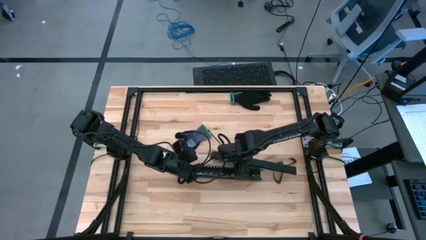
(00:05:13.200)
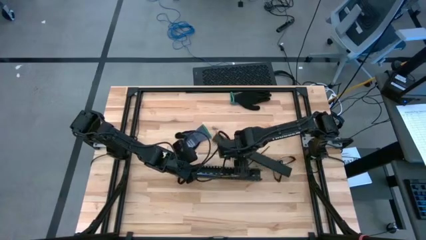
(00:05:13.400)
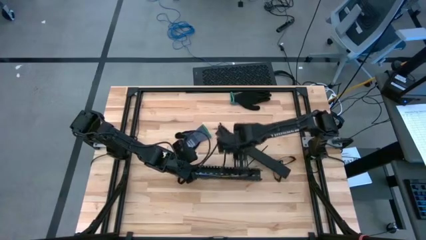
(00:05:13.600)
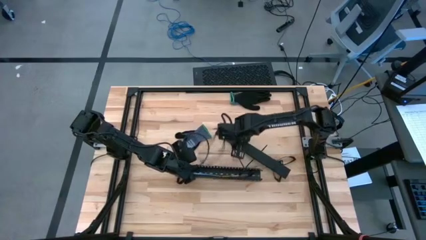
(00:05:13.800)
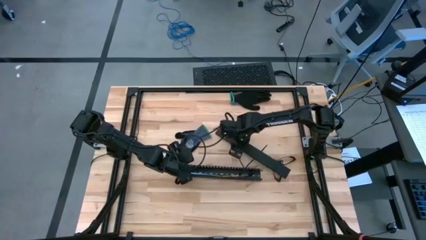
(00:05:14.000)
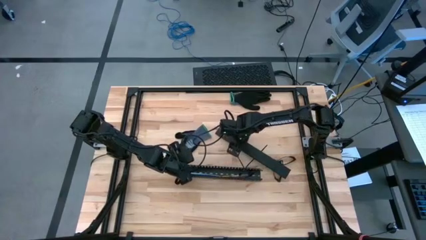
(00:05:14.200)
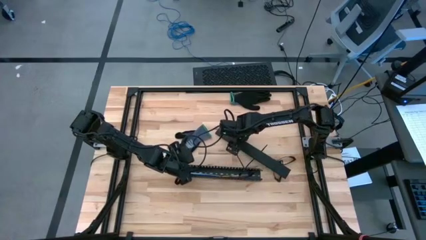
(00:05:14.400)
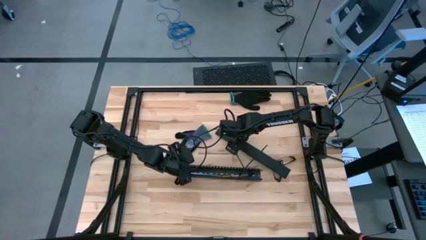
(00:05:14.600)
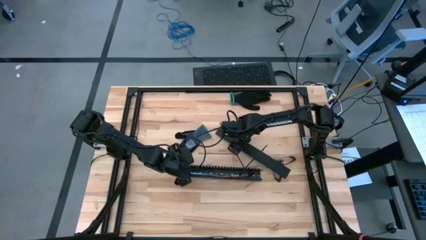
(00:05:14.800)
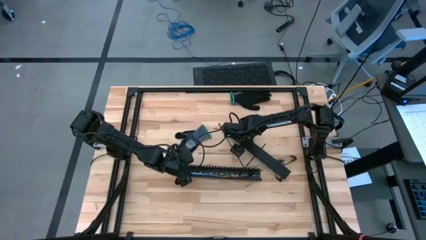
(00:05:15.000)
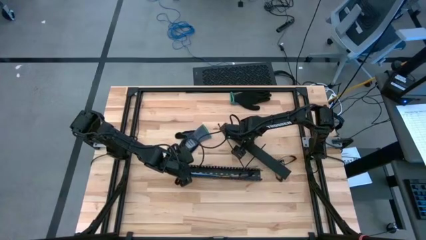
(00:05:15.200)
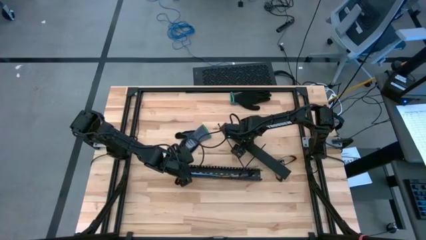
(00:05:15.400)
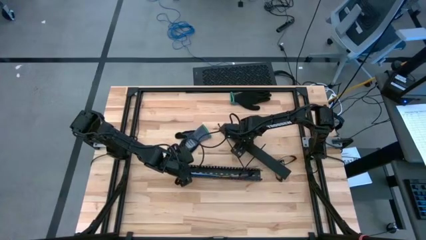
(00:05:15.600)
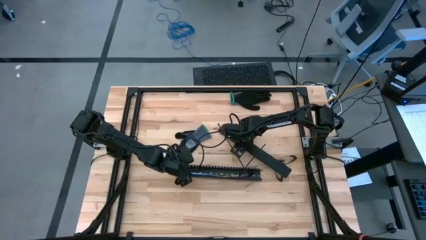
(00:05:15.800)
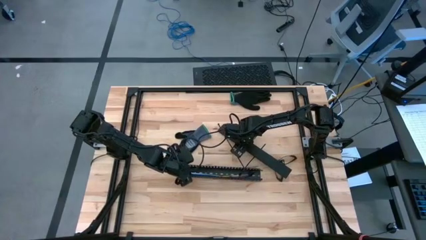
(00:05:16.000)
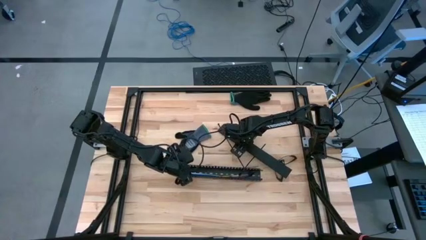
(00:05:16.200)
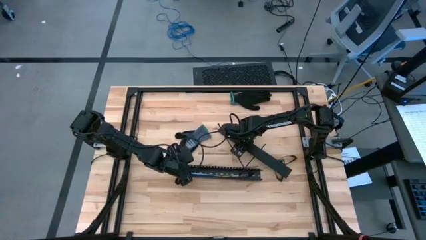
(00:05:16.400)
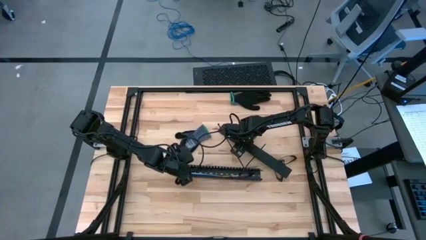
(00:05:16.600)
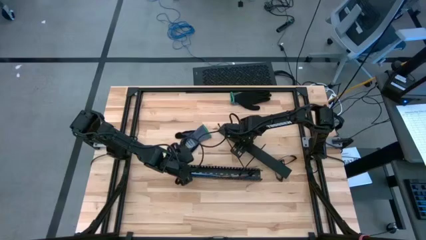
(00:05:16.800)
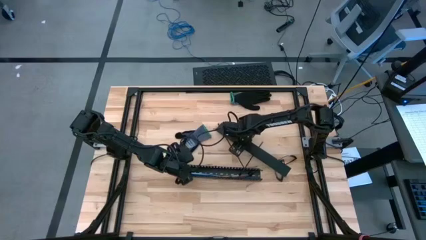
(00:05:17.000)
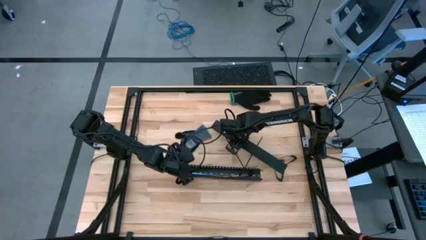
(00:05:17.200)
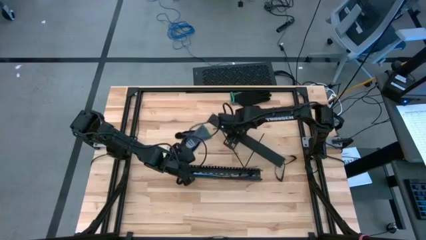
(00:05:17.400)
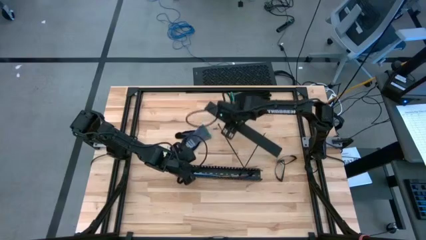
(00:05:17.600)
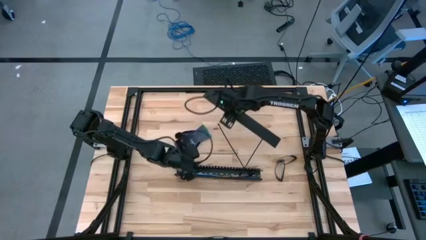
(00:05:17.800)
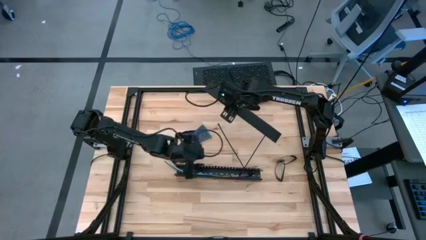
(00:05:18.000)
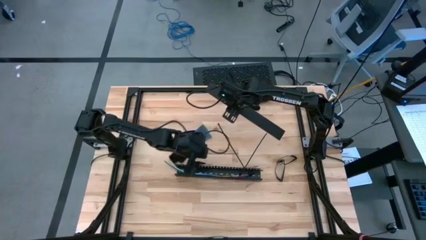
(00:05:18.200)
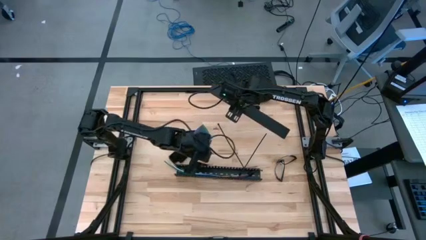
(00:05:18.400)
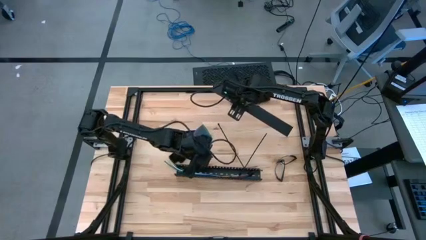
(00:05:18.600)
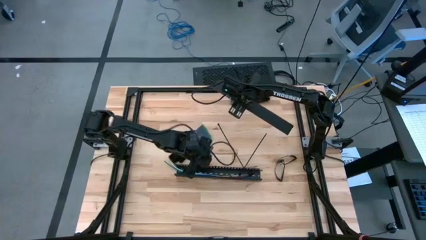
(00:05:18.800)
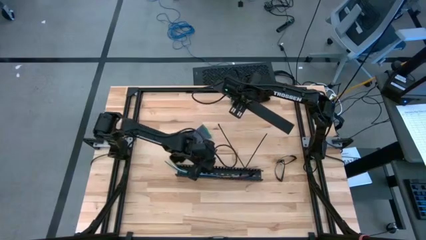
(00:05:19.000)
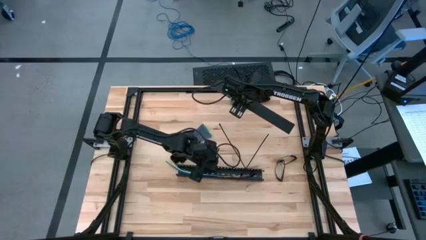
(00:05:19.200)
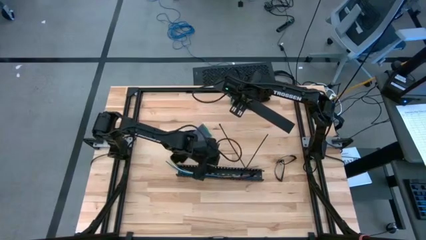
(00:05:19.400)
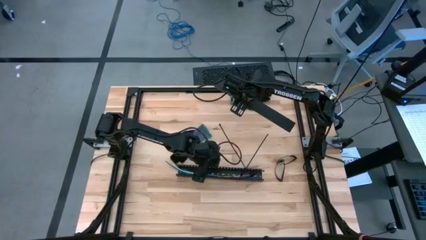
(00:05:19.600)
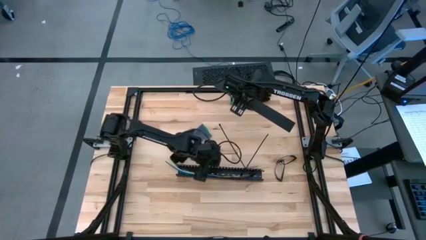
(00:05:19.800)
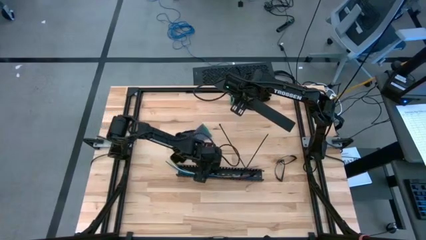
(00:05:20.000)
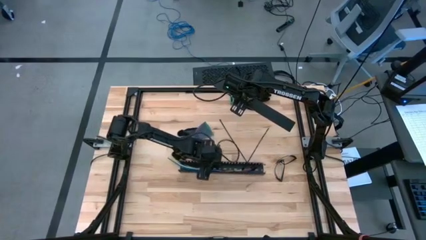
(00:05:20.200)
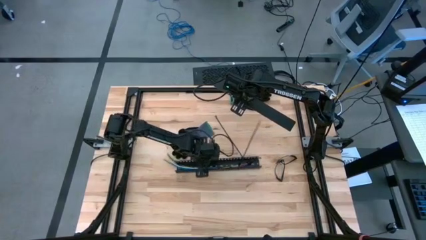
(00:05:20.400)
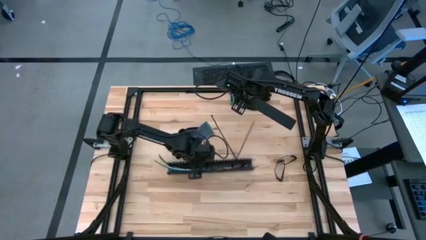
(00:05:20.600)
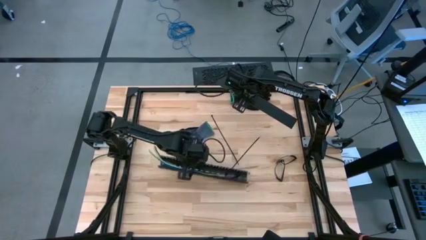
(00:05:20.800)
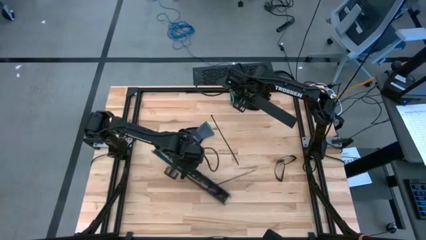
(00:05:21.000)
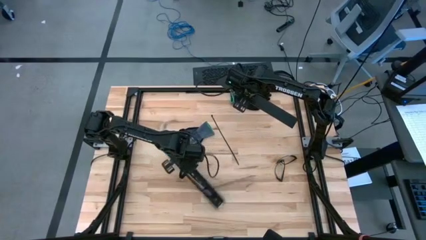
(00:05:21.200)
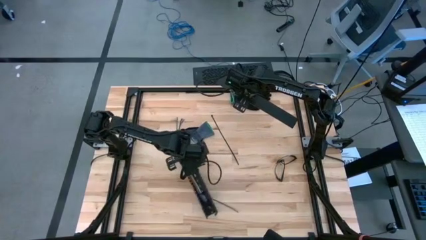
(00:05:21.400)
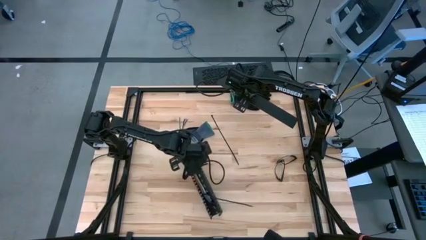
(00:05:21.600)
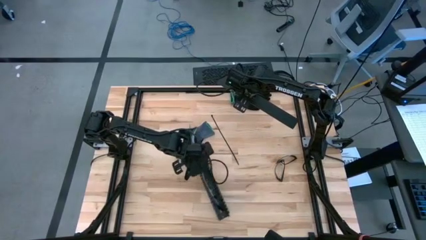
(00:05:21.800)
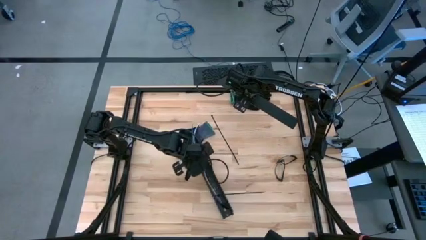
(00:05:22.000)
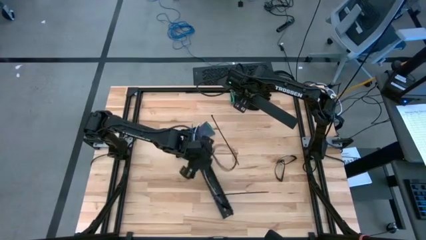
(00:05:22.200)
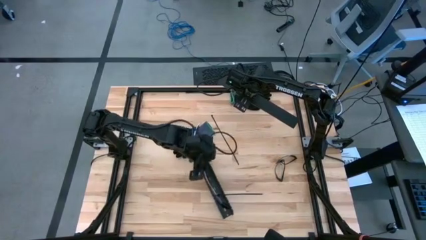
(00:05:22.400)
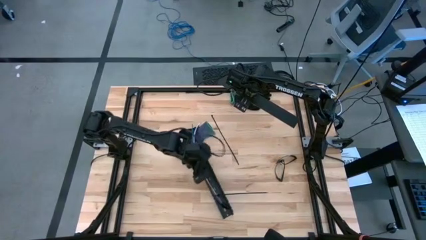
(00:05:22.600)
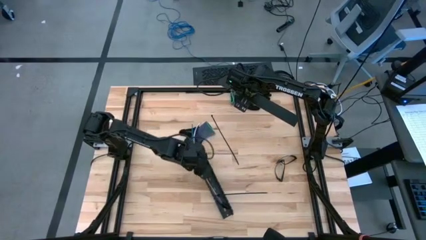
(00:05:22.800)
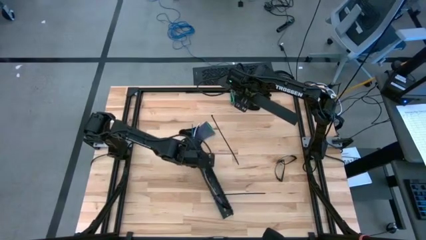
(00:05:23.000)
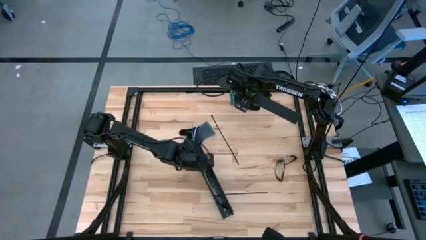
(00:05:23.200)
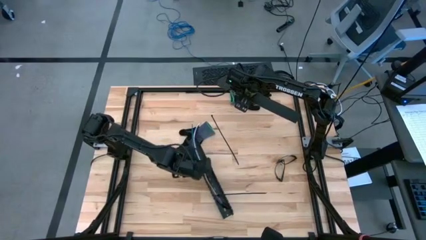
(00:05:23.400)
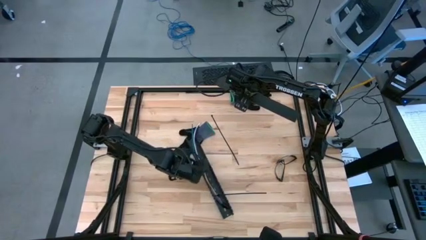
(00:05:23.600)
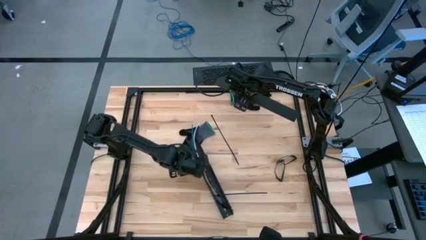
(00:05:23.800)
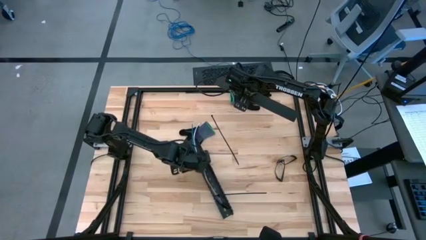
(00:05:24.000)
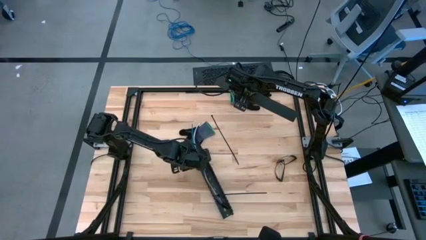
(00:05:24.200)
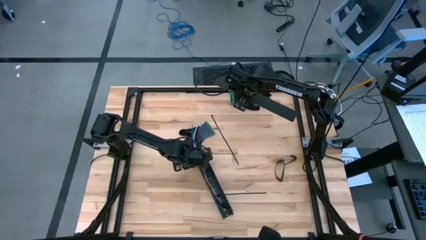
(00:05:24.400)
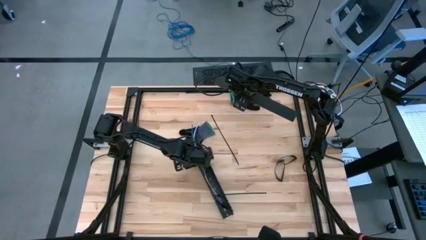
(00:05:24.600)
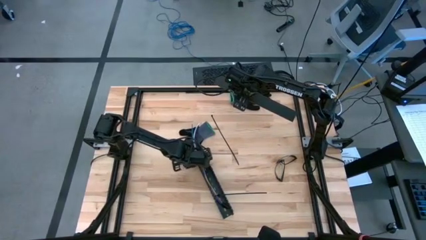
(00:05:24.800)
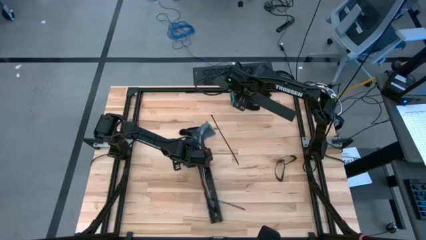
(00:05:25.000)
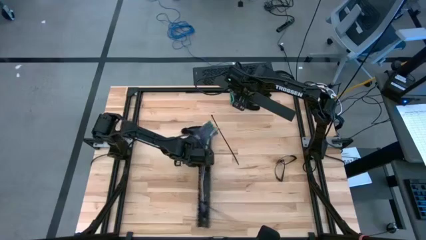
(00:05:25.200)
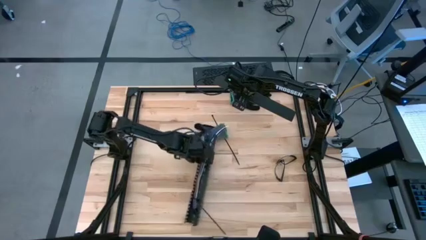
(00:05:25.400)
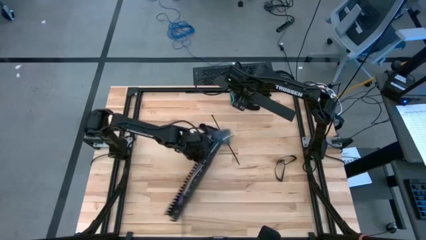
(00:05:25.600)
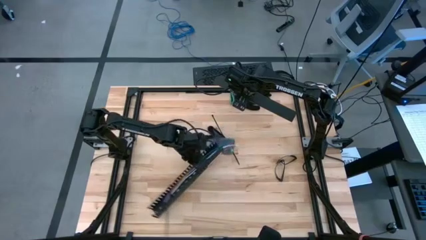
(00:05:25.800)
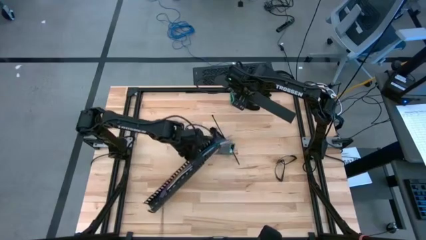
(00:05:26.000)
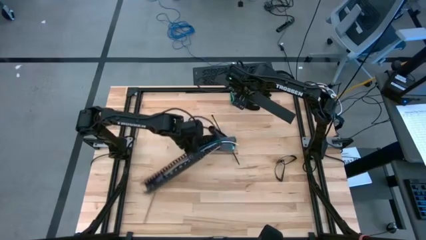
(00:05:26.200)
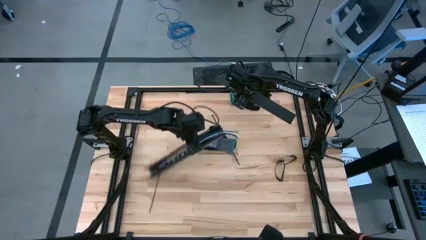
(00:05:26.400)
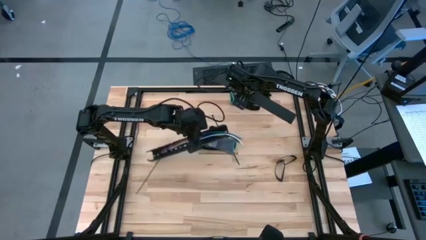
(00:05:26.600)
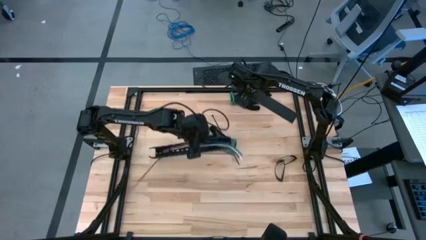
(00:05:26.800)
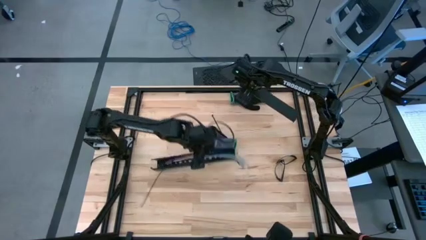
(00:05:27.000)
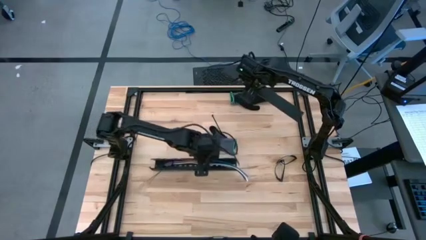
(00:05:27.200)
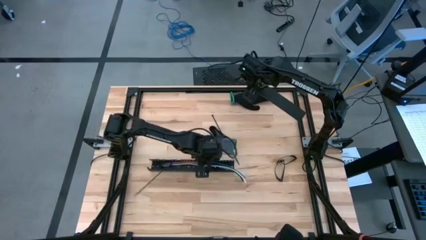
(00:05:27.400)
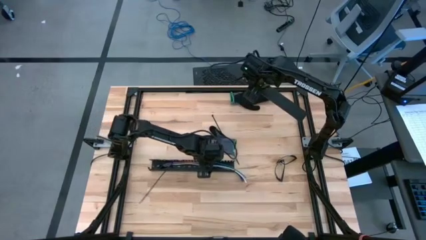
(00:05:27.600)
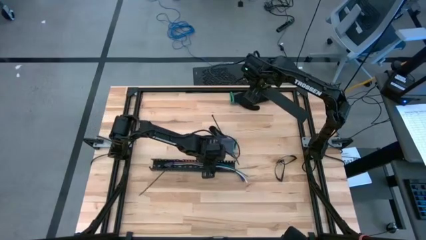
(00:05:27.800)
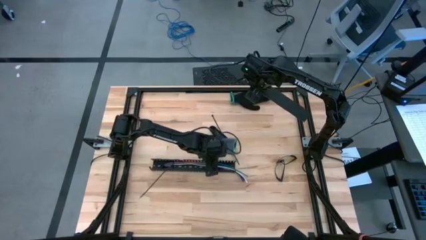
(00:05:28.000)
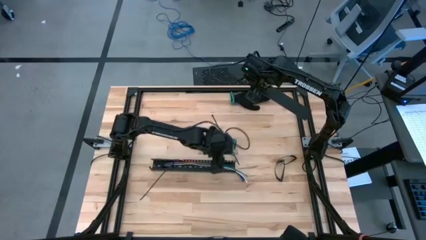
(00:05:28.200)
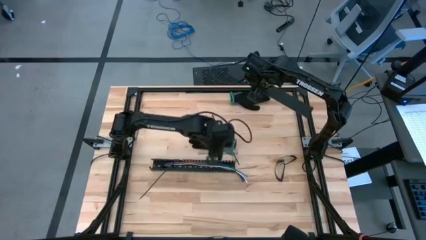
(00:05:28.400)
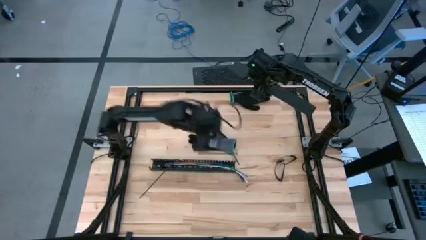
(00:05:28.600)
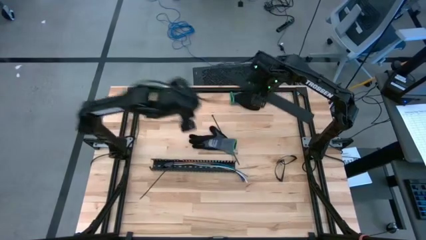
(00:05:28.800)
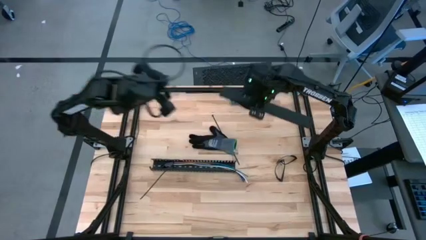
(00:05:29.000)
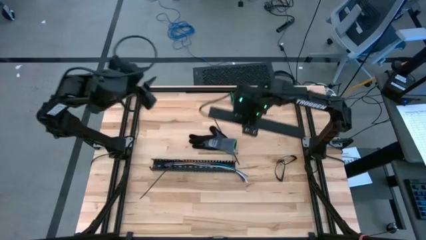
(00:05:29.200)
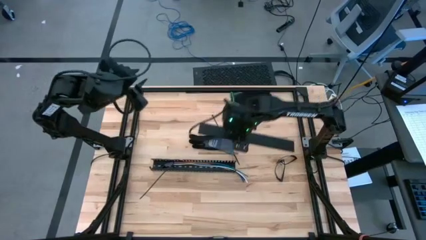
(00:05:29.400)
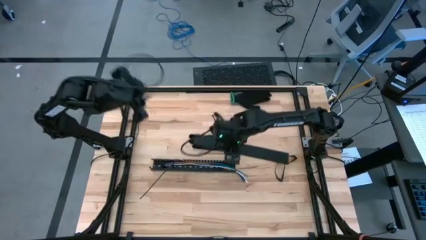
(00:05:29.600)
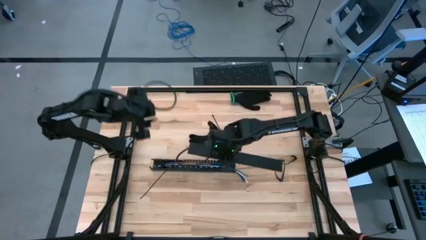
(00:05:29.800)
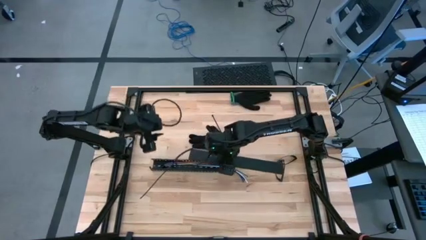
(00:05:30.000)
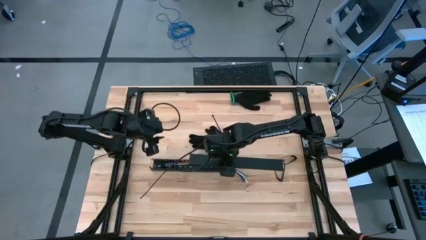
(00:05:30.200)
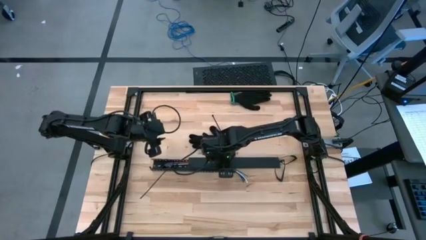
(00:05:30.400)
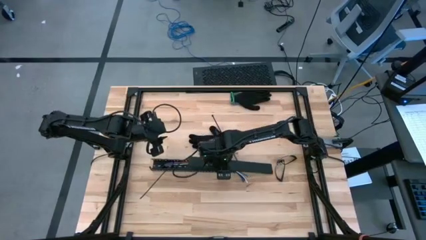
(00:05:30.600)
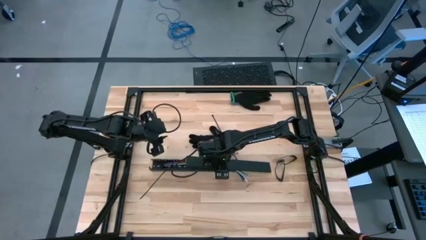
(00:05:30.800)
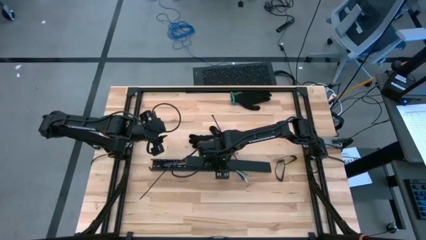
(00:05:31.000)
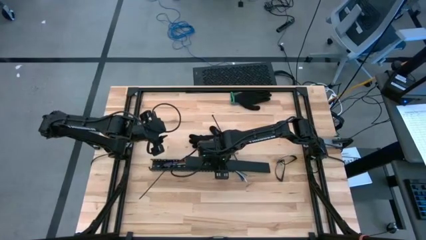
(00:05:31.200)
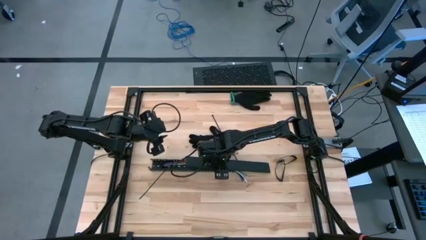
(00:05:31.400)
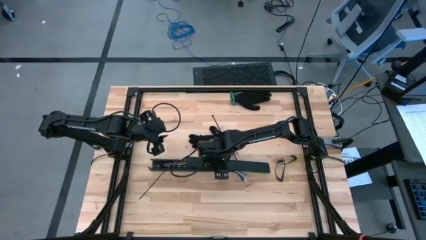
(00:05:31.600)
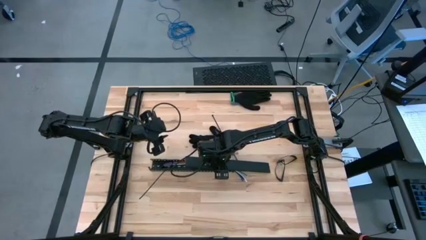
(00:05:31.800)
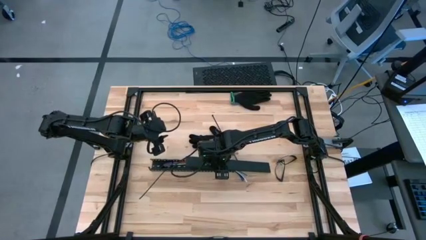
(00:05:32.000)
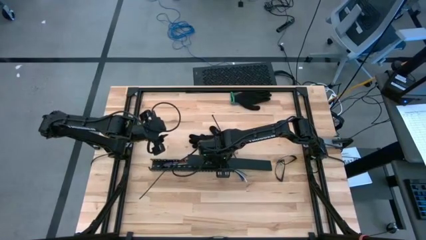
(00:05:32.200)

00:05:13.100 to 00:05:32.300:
Task: Ziptie cables
Close the black cable duct
